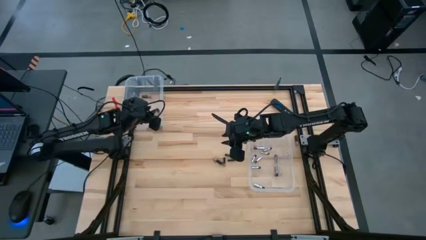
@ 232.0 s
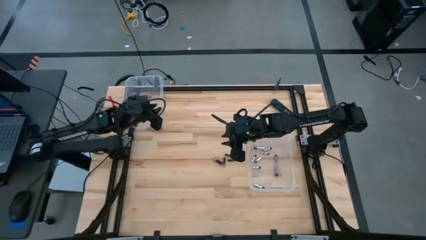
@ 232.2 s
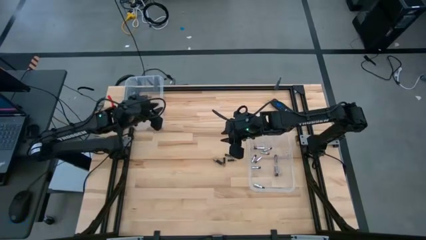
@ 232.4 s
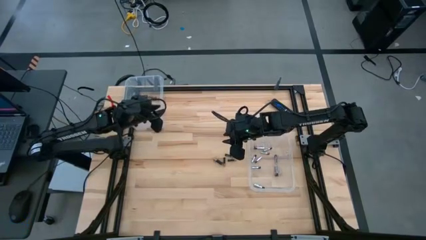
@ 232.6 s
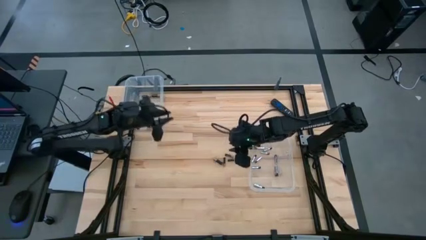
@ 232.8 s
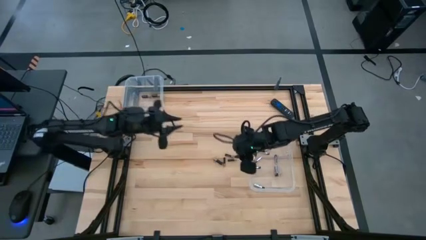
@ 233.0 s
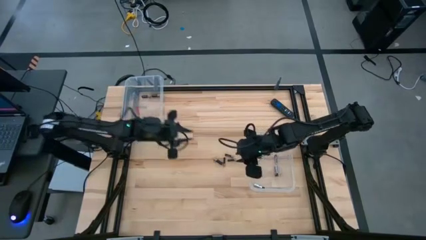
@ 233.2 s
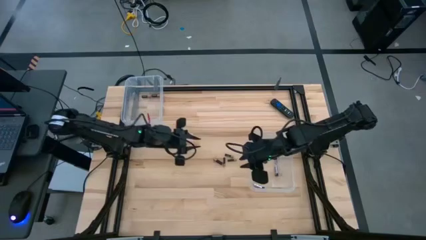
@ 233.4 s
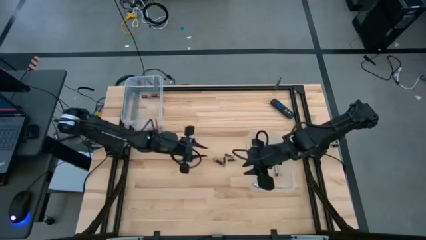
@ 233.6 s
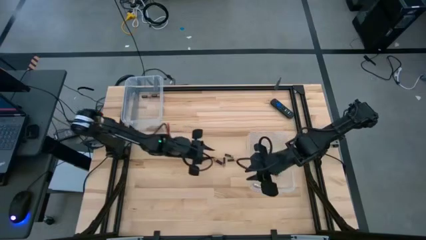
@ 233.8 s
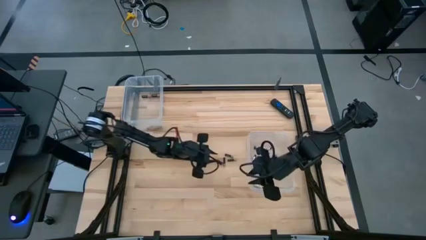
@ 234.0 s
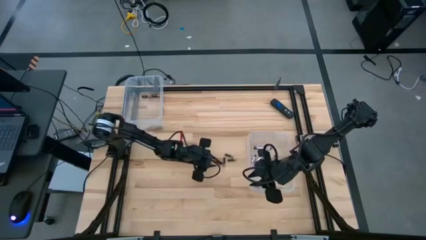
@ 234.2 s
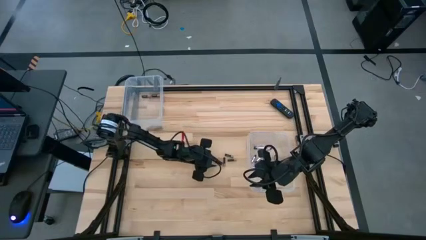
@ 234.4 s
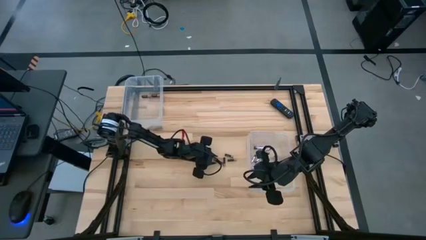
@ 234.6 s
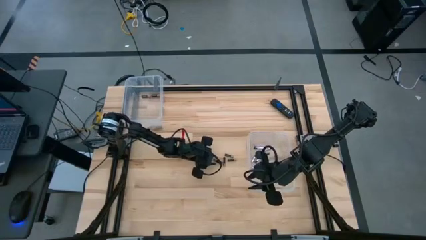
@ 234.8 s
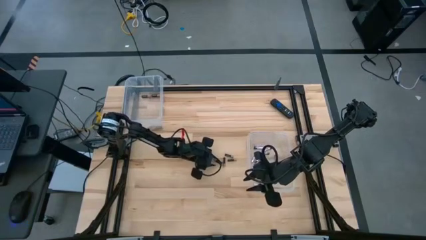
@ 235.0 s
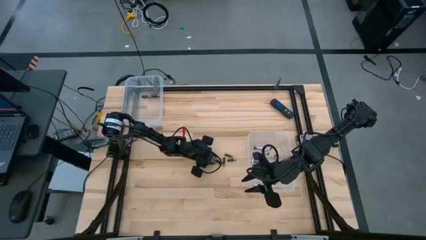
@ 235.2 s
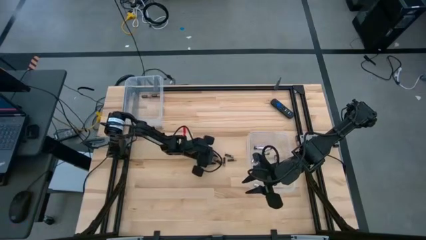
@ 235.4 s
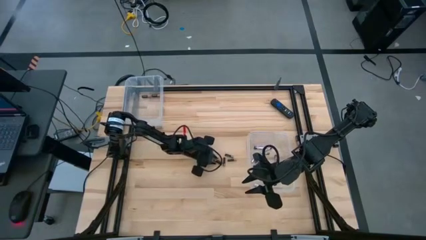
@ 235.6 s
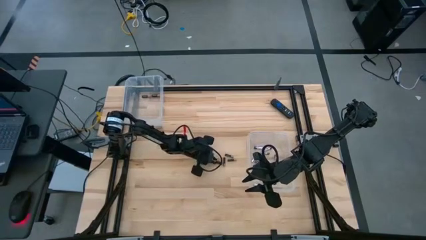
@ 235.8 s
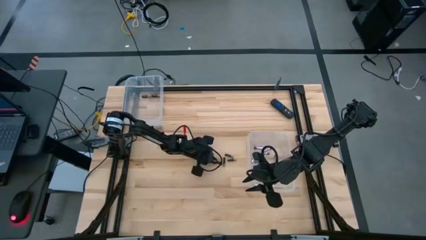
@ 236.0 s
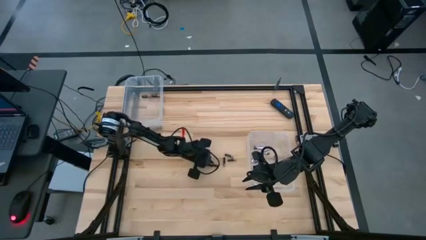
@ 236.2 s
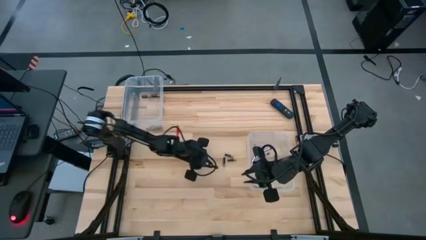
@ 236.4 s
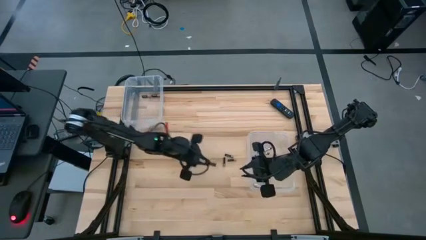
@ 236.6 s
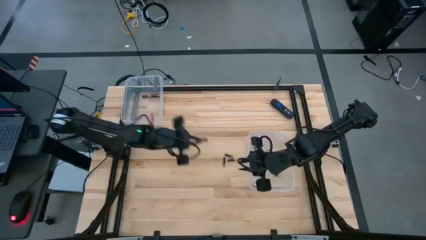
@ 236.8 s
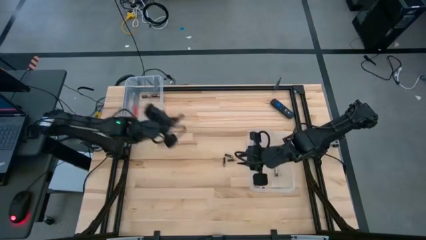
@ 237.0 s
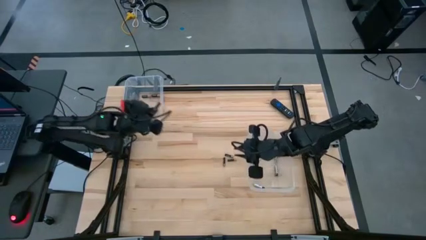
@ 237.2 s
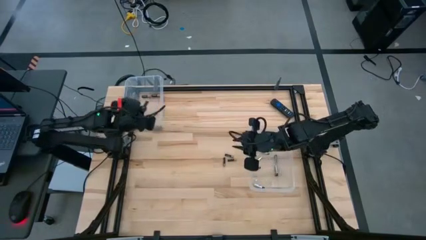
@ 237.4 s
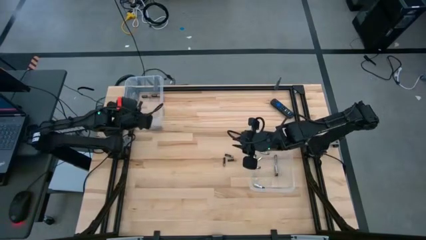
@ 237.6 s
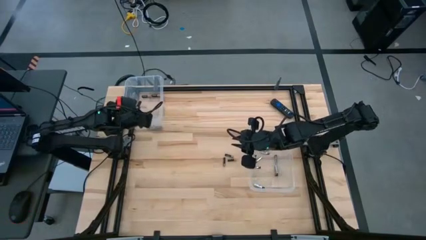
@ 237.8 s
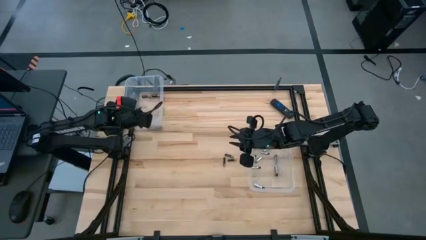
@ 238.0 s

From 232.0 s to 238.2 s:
Task: Sort batteries
Put the black and copper battery into the top transparent bin

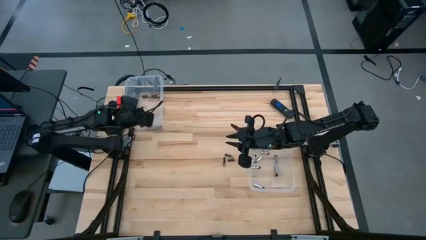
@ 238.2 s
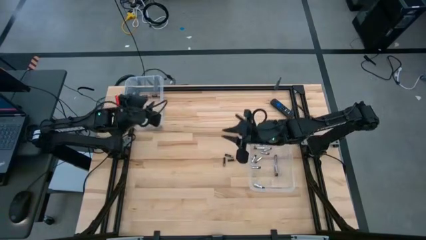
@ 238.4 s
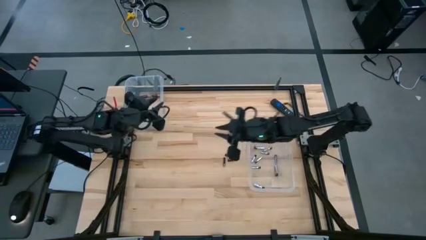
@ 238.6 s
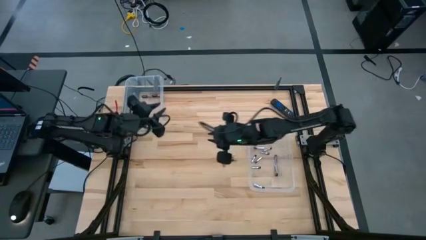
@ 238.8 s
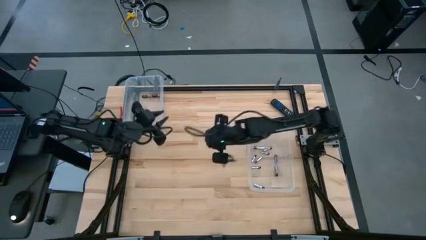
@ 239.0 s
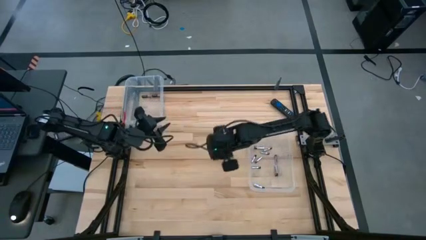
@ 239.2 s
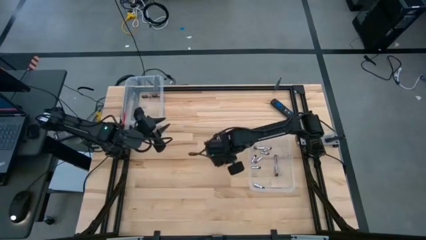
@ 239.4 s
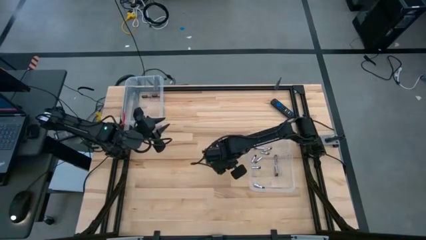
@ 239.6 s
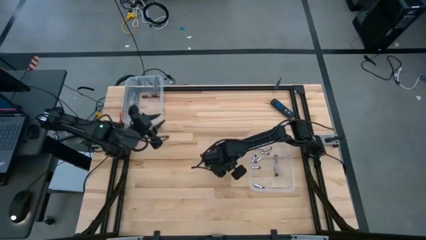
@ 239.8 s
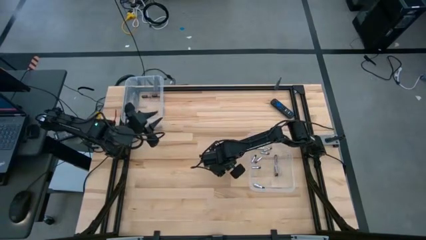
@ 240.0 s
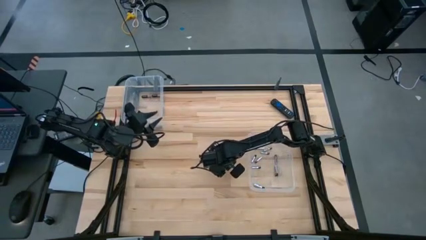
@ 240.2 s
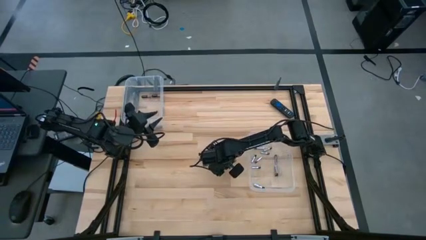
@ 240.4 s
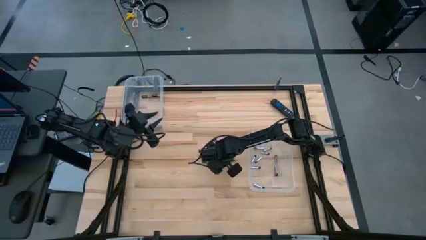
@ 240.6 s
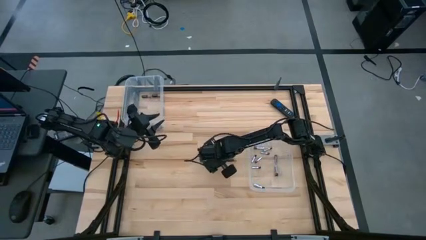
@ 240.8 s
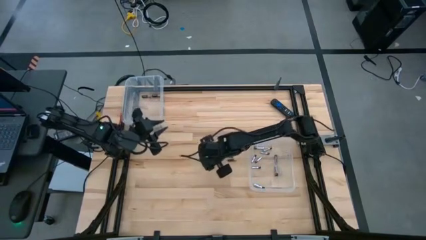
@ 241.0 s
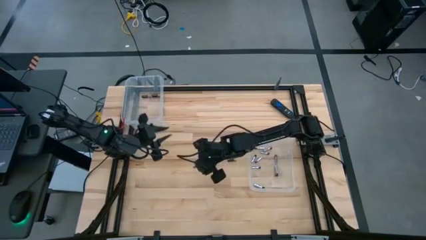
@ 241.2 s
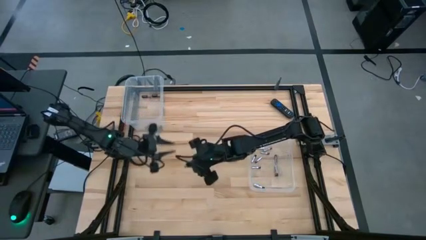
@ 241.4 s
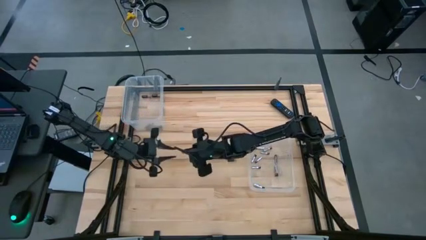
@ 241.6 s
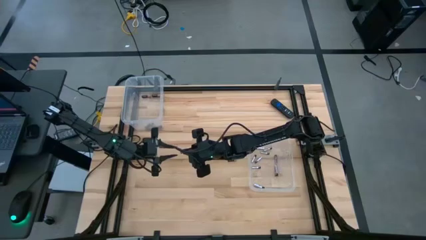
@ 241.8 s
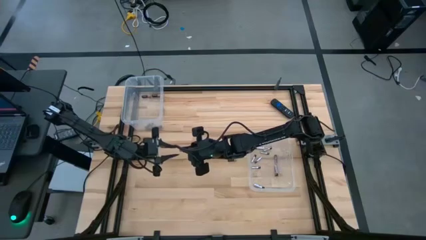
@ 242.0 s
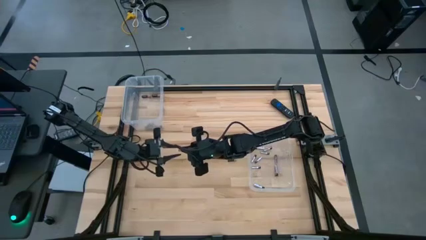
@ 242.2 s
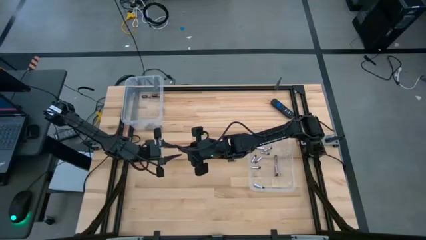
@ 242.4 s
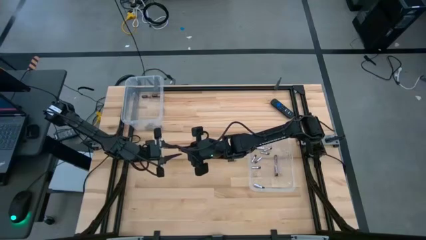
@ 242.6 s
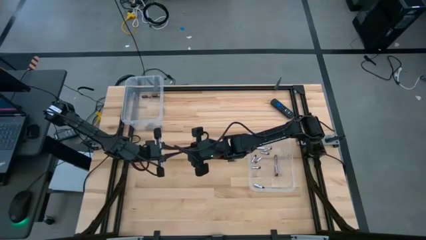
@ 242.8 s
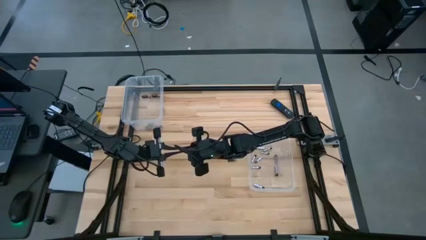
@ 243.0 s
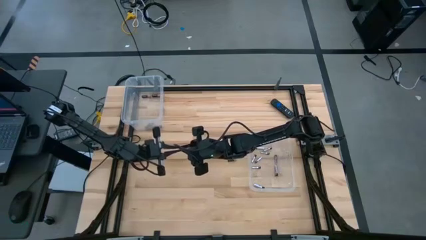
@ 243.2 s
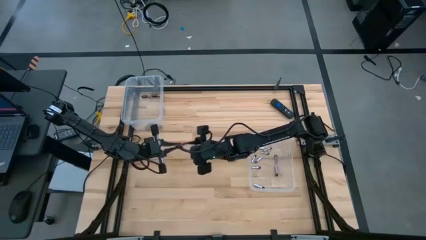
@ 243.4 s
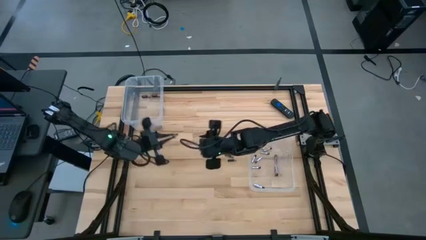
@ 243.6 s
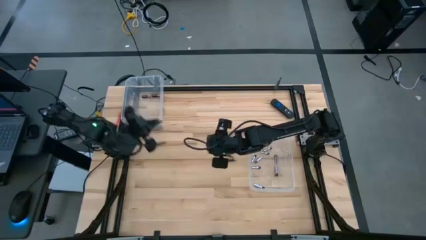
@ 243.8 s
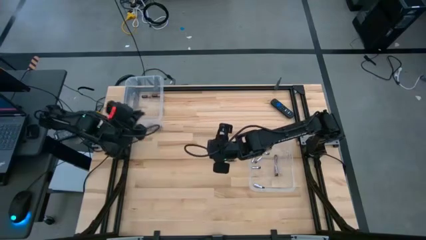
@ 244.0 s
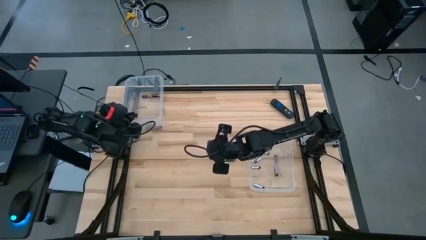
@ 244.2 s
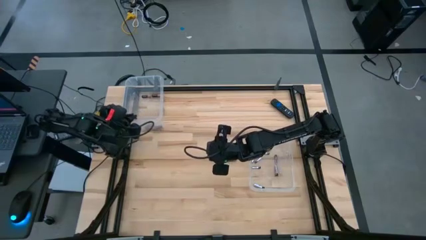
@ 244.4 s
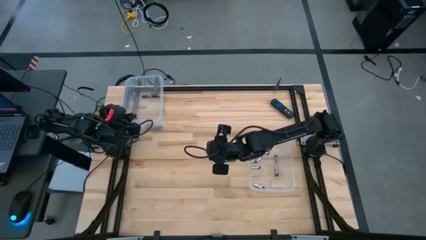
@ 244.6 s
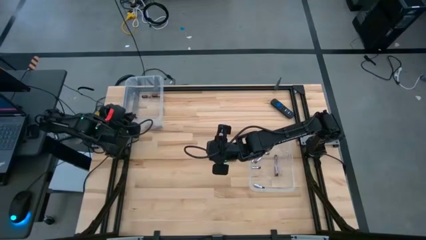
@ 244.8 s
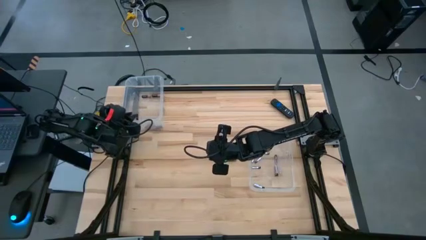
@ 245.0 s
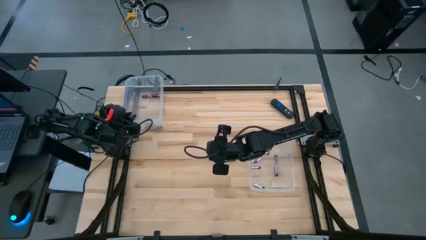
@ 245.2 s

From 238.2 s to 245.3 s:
Put the black and copper battery into the top transparent bin
